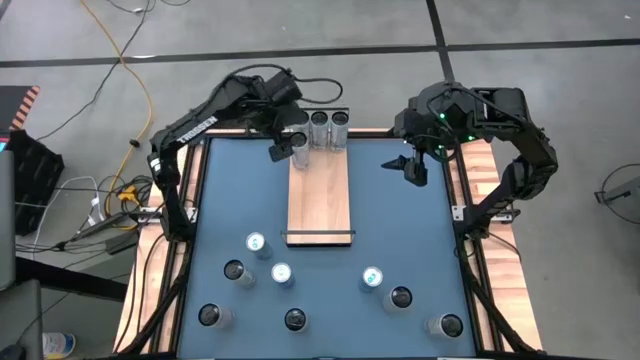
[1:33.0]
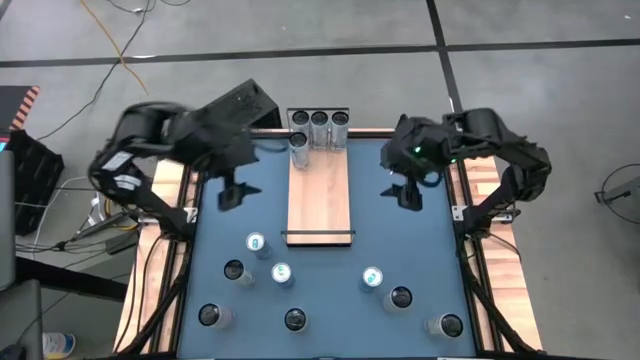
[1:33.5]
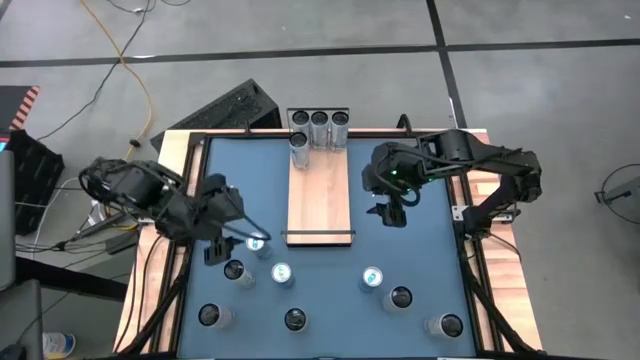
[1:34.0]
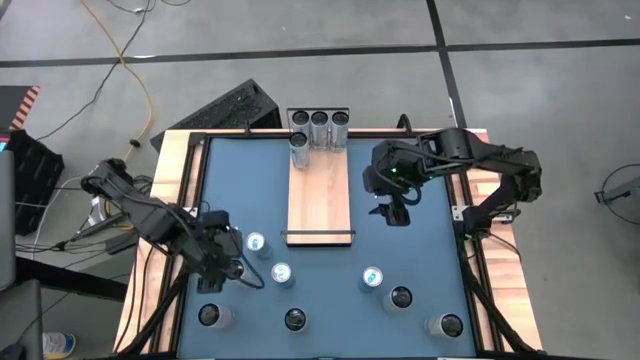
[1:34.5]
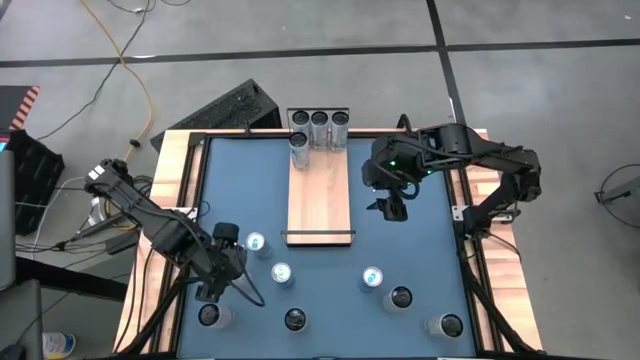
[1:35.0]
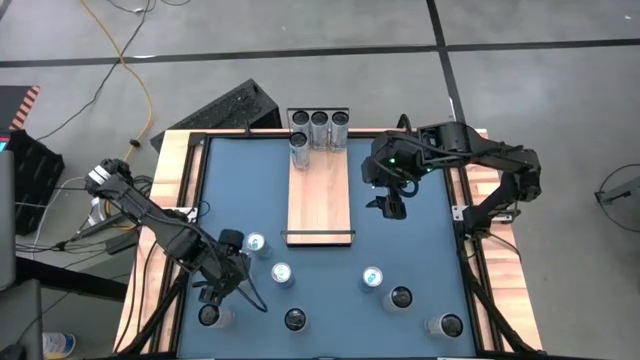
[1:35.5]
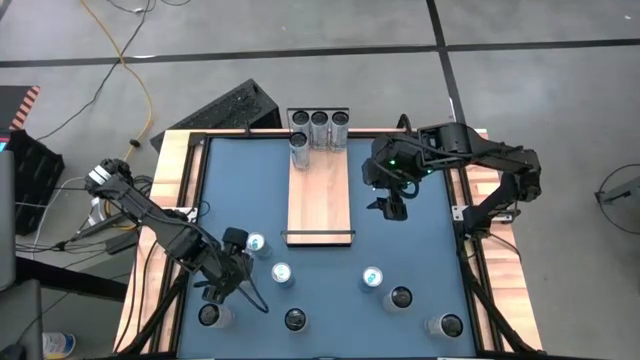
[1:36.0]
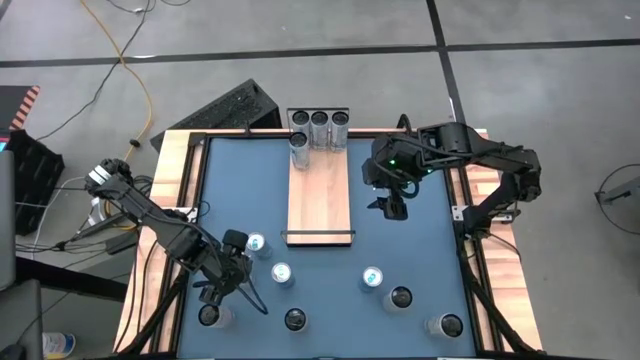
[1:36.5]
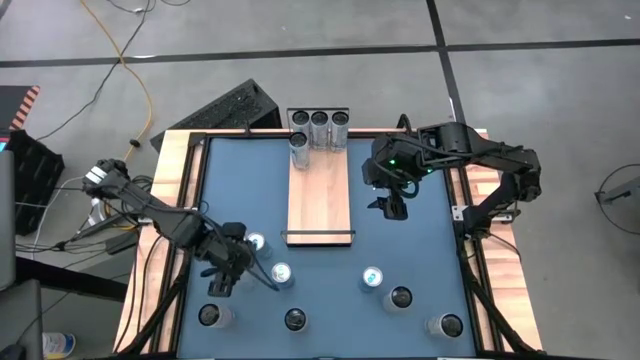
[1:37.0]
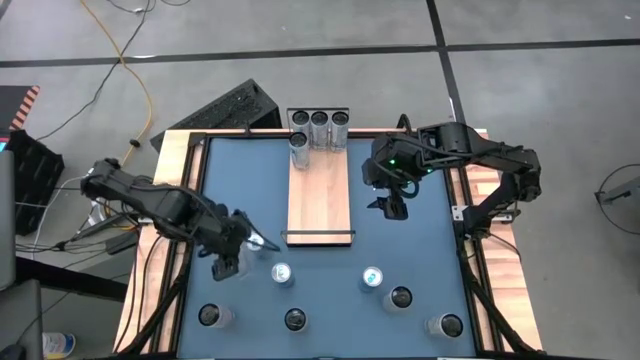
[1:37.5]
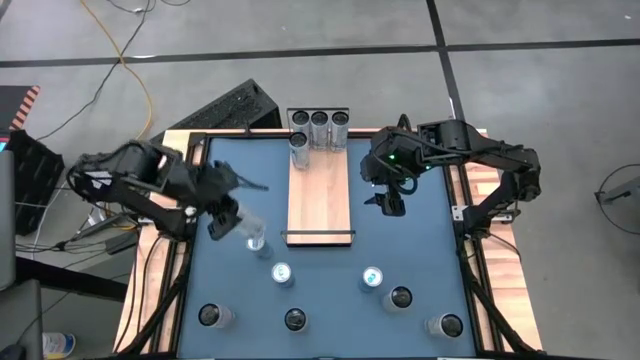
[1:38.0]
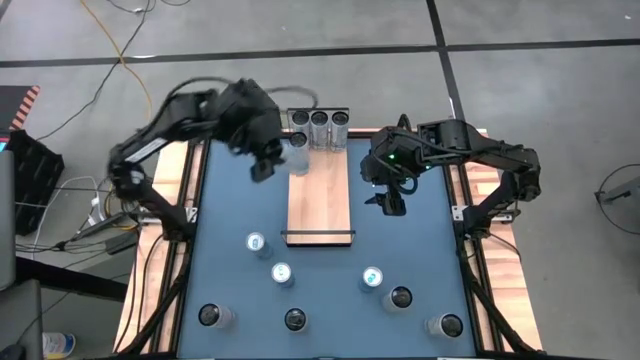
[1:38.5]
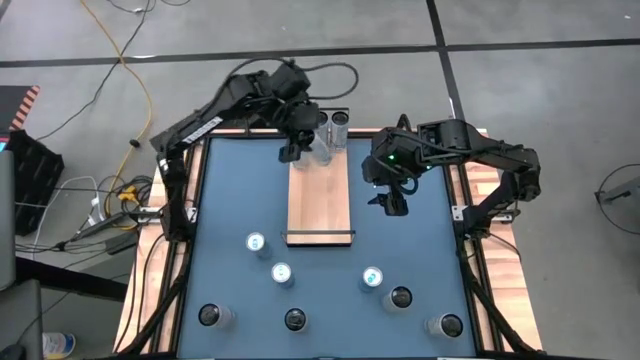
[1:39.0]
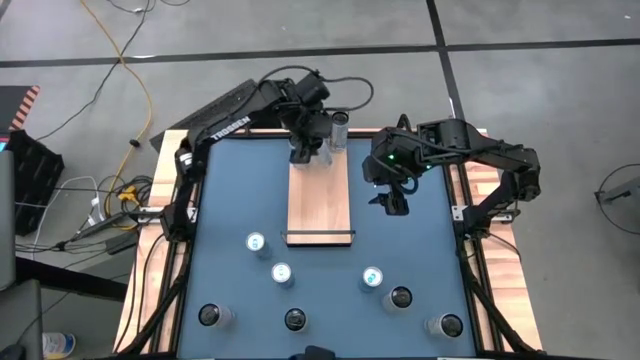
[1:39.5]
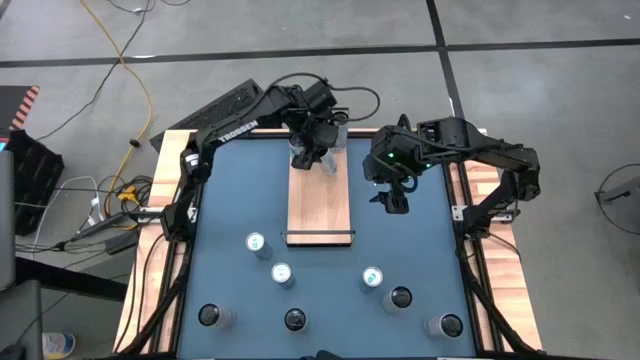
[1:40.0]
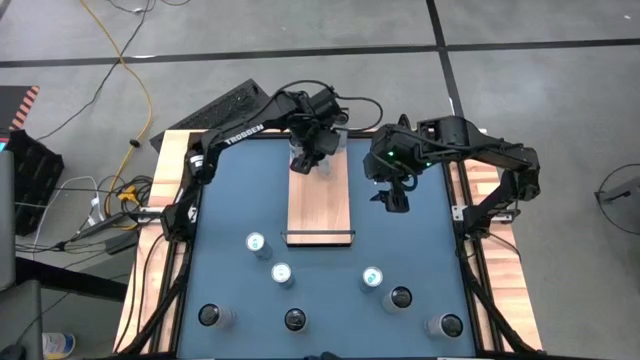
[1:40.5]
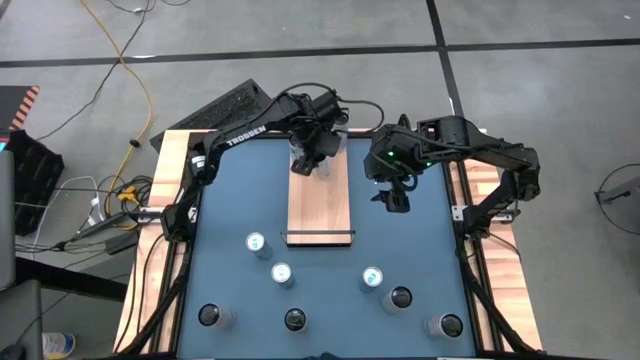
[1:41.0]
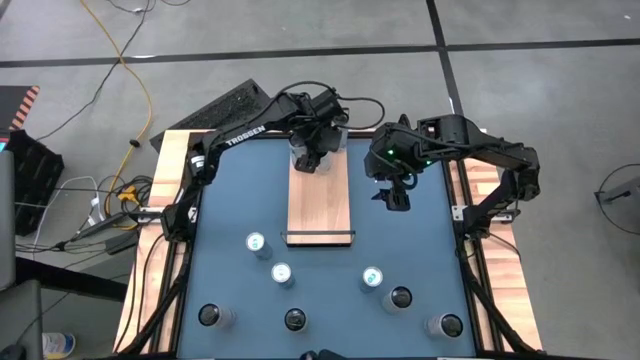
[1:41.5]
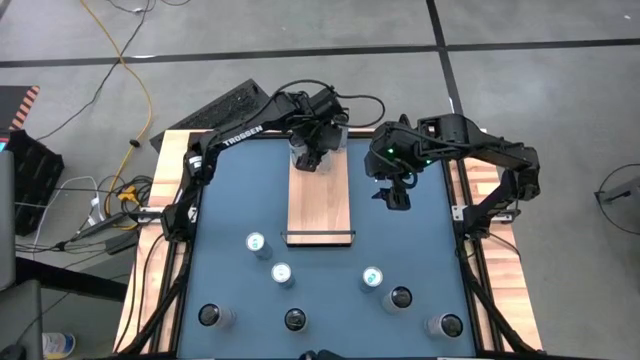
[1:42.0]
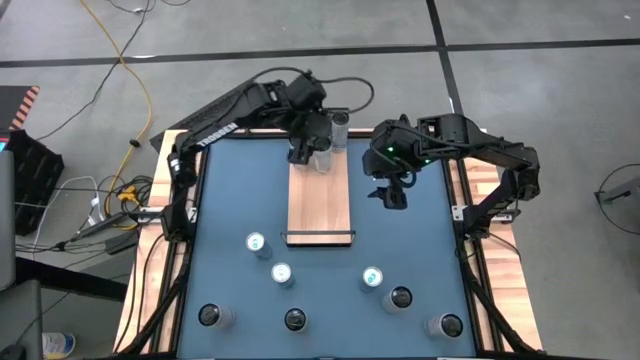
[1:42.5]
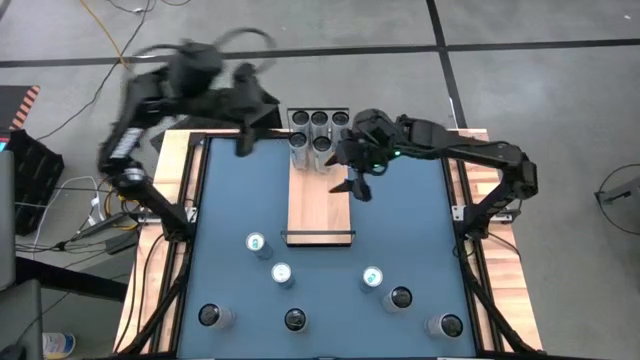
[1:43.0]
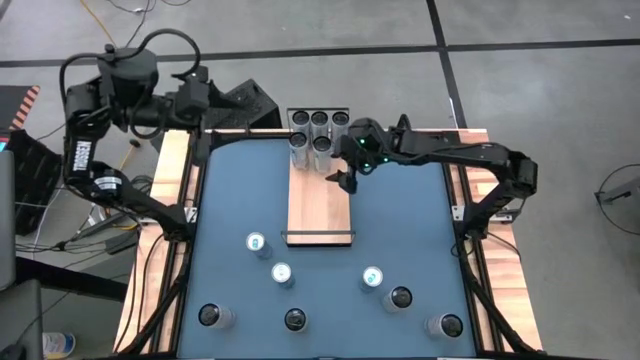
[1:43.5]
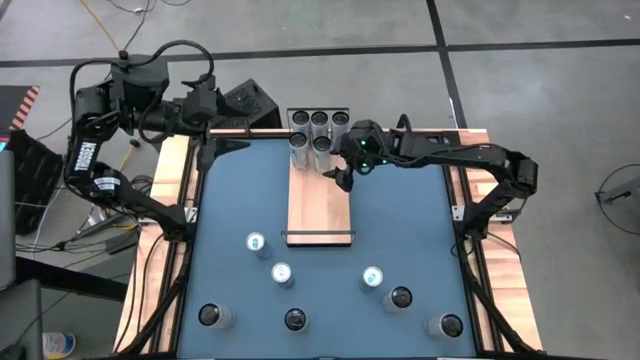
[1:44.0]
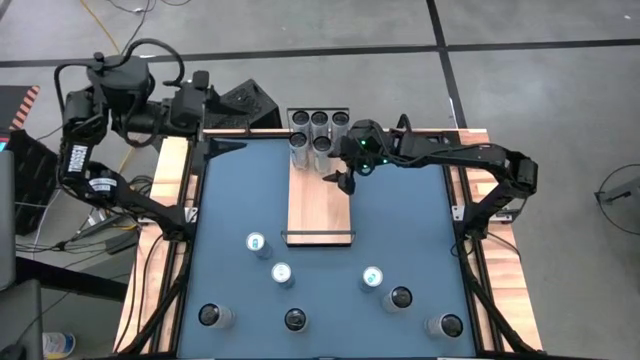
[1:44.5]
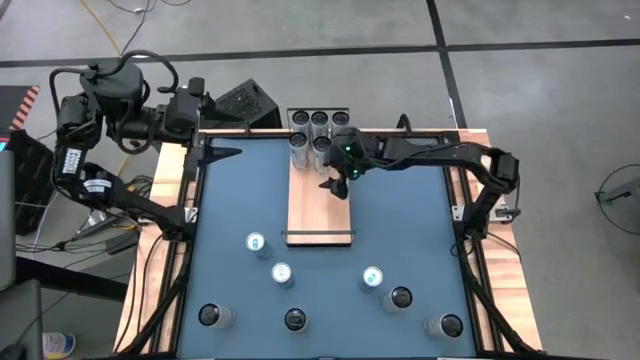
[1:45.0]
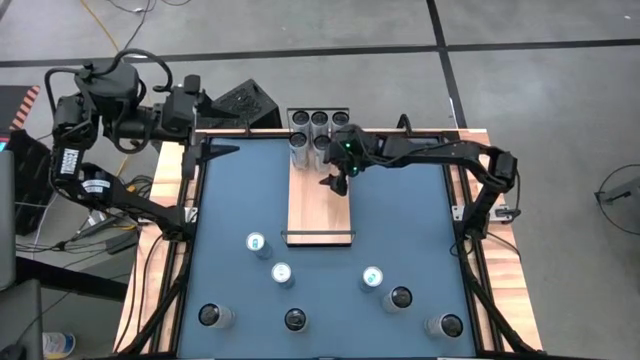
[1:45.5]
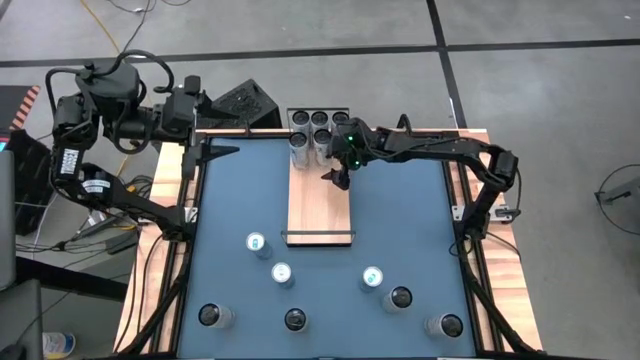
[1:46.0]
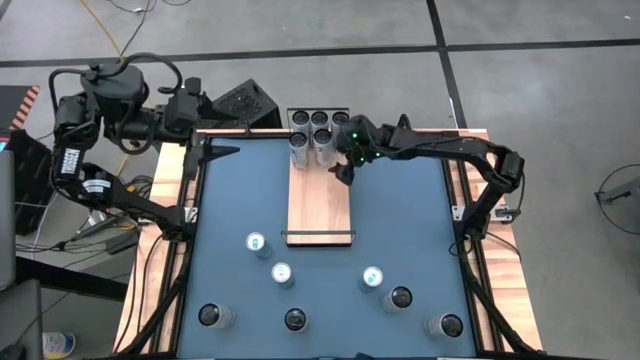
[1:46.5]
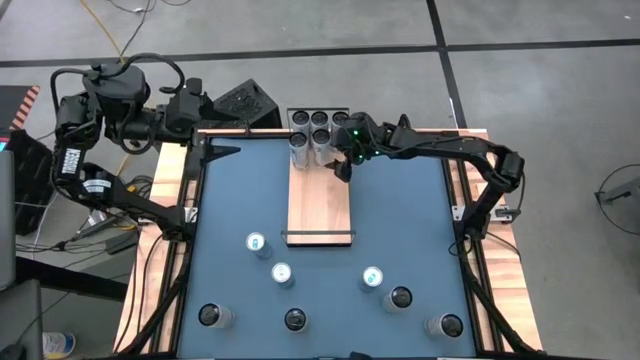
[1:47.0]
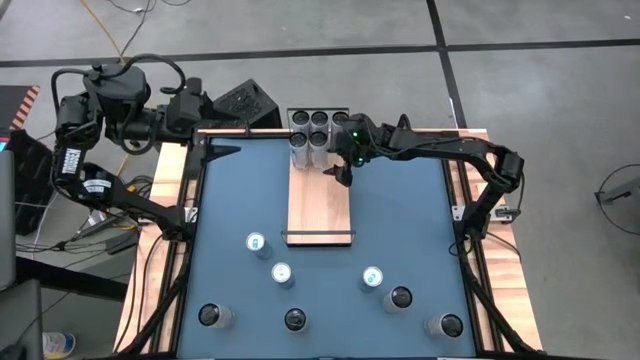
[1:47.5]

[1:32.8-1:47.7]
Task: Place canned beverage on shelf
Put the top white-pink soda can on the shelf

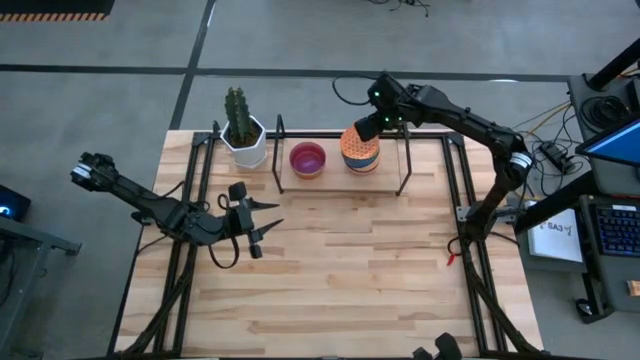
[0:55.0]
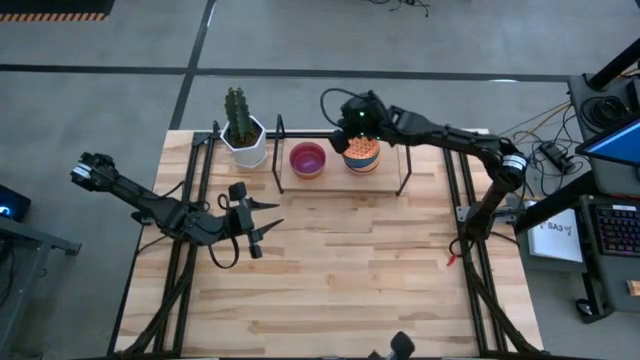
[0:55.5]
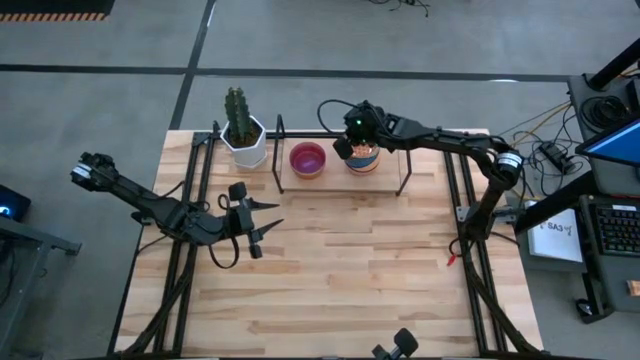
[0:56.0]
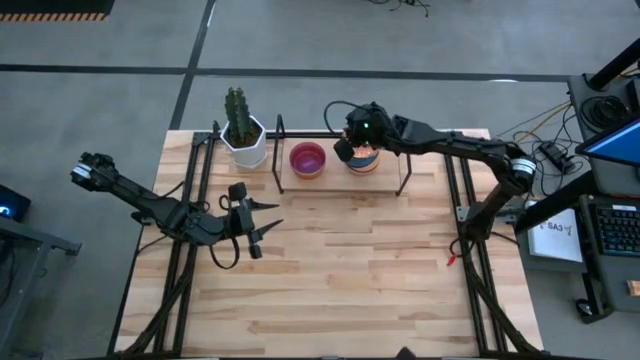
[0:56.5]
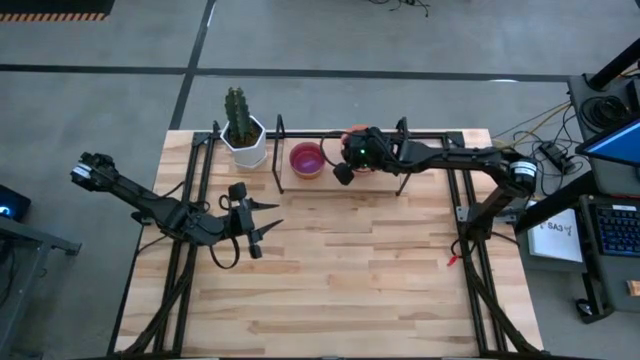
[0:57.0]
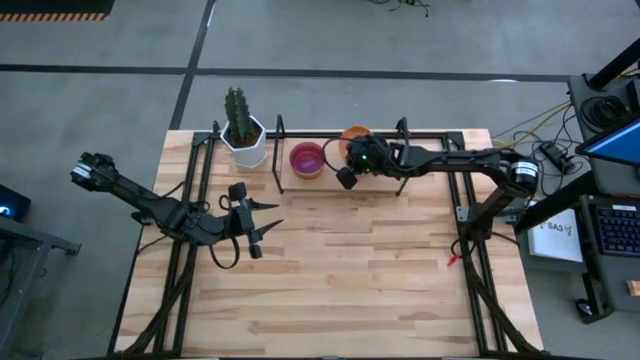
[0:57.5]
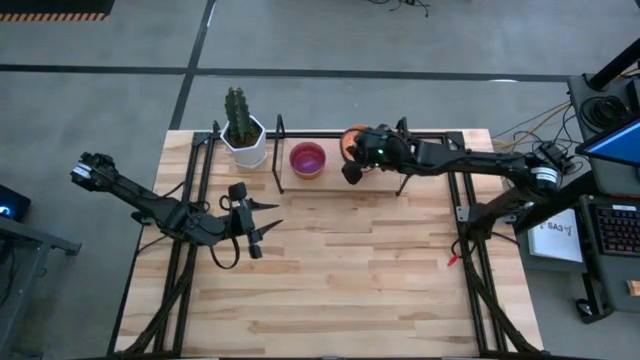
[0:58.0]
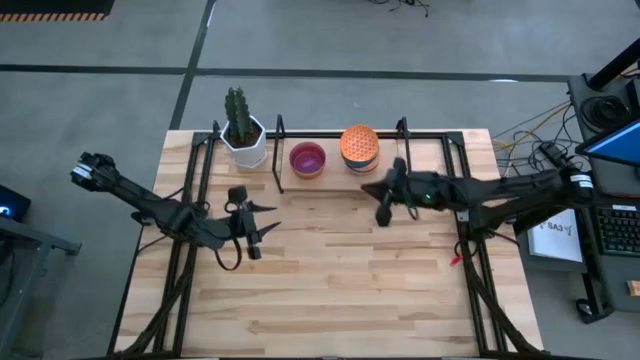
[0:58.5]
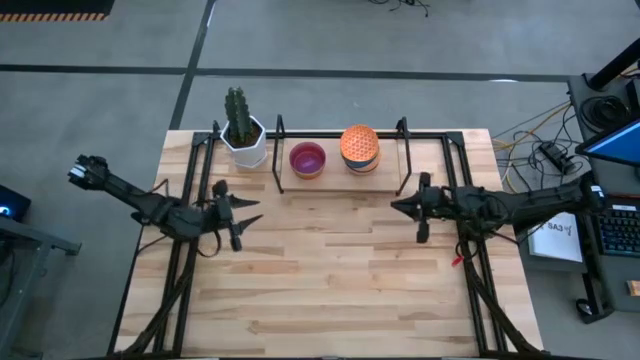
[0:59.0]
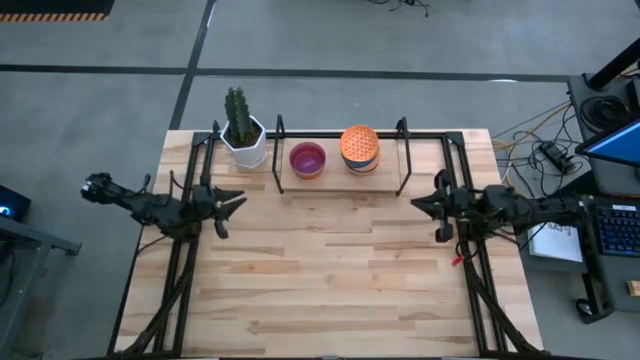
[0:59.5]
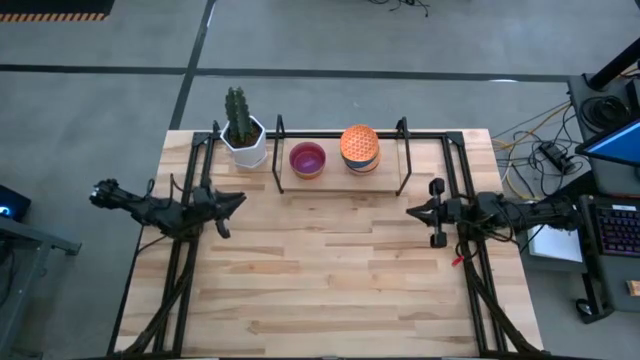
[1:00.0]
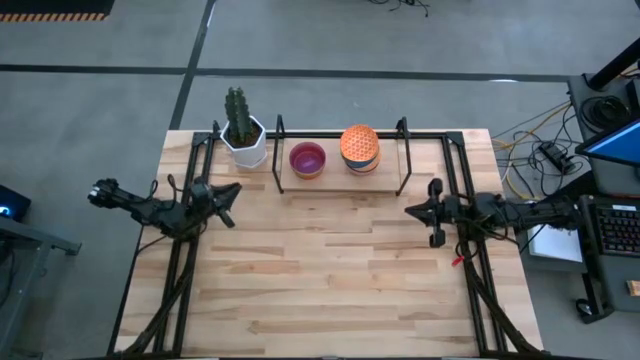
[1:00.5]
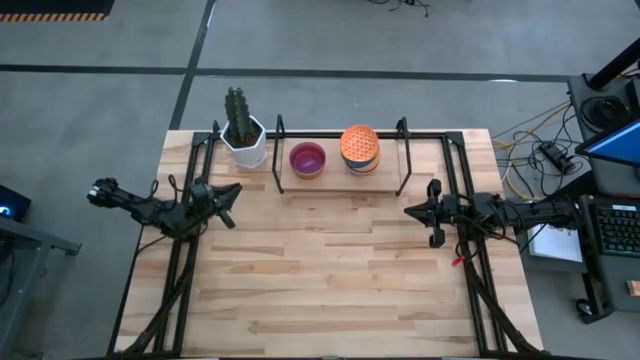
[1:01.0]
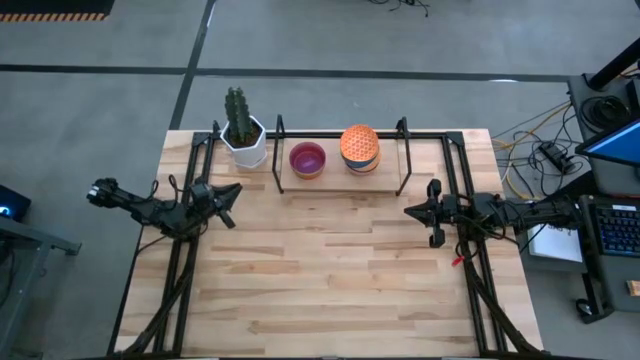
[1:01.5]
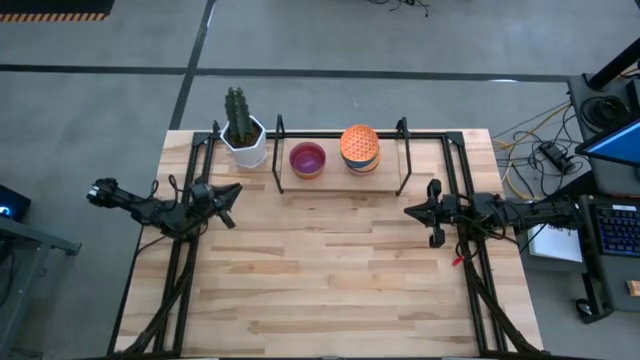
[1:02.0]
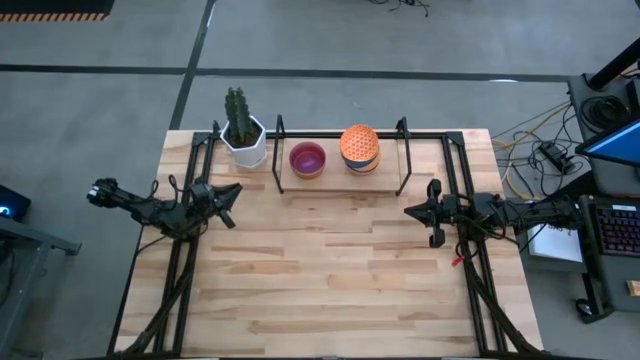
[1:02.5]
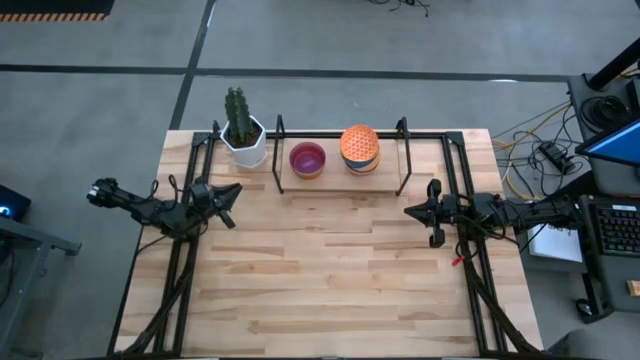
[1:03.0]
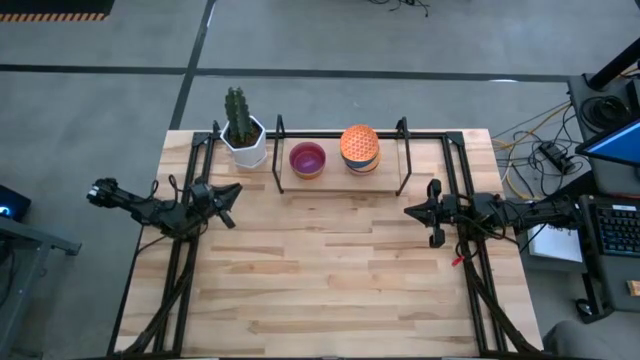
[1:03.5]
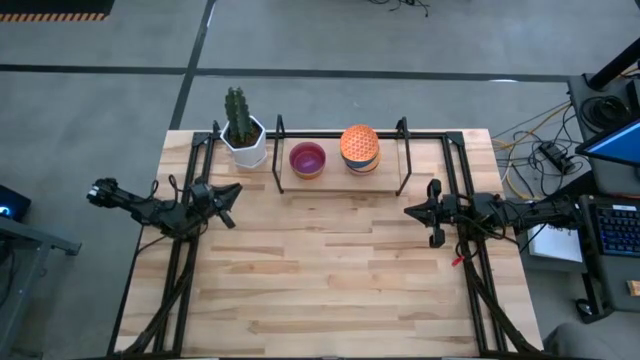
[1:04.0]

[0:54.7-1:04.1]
Task: Place and stack bowls onto a shelf
Return to Home Position
